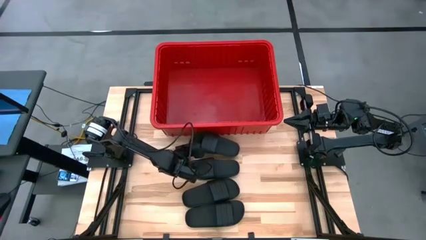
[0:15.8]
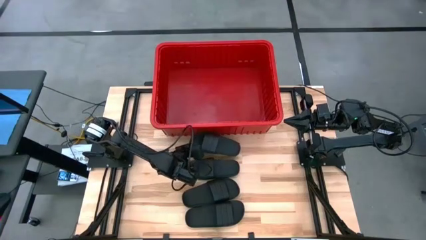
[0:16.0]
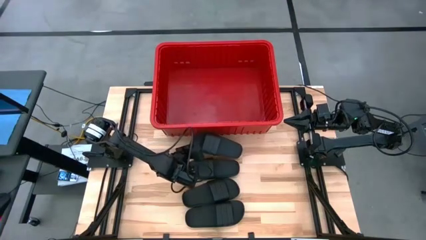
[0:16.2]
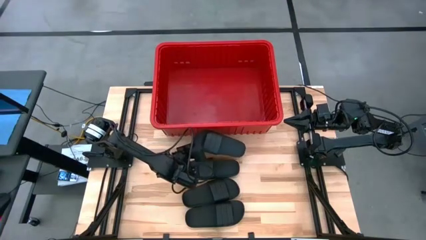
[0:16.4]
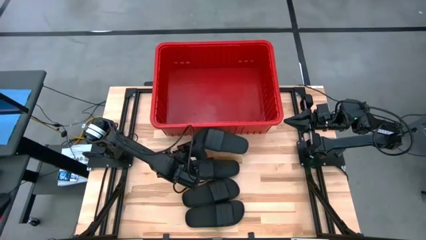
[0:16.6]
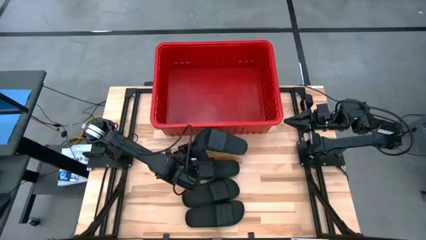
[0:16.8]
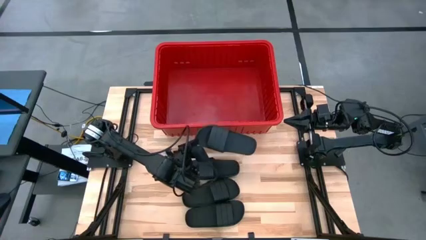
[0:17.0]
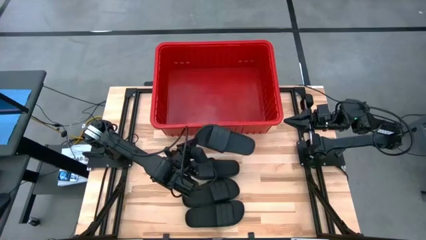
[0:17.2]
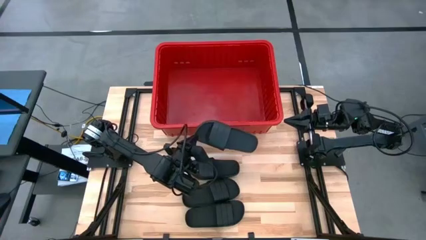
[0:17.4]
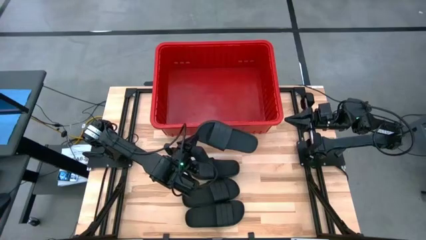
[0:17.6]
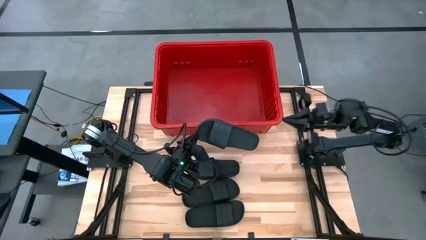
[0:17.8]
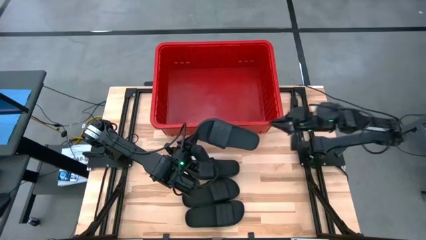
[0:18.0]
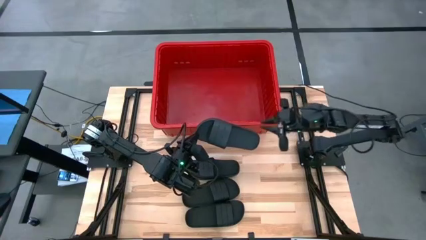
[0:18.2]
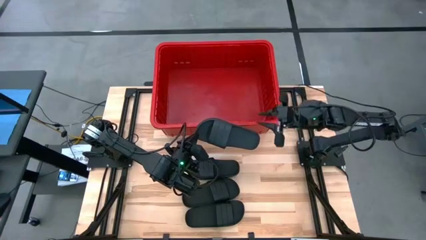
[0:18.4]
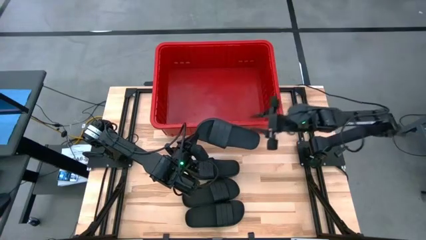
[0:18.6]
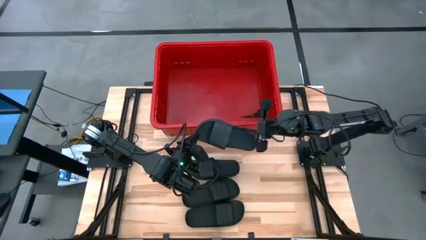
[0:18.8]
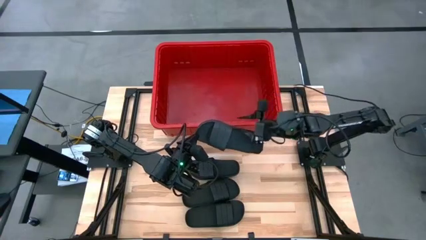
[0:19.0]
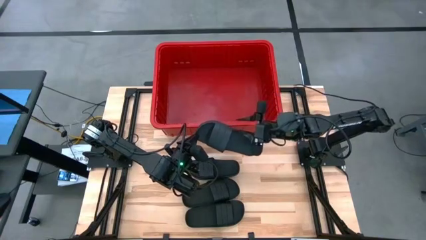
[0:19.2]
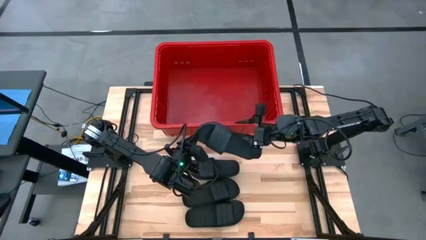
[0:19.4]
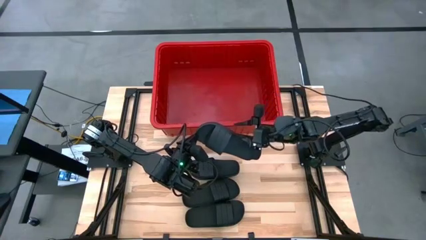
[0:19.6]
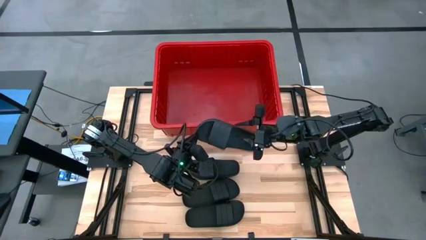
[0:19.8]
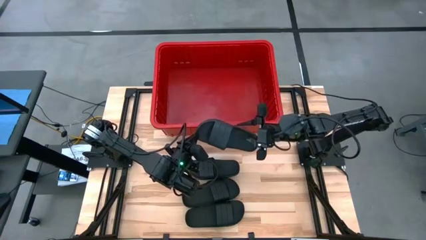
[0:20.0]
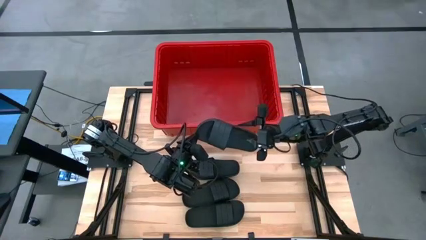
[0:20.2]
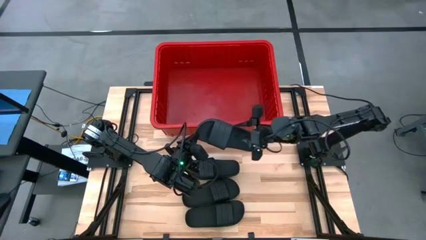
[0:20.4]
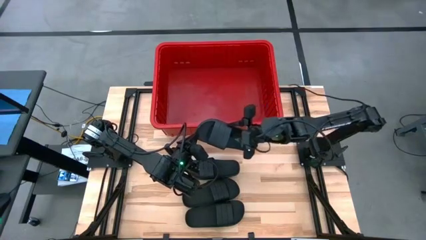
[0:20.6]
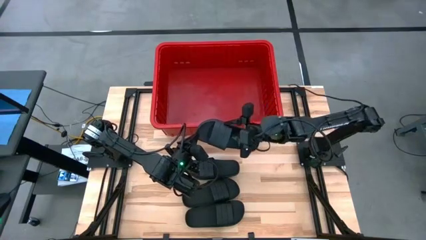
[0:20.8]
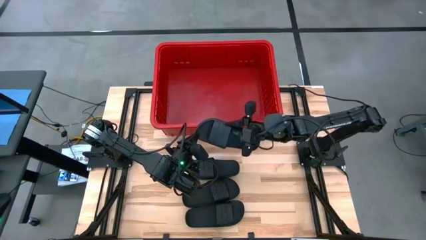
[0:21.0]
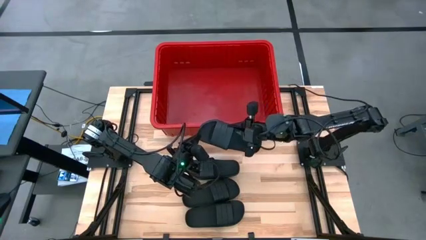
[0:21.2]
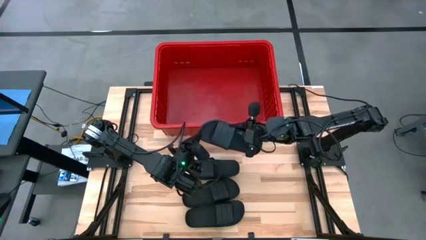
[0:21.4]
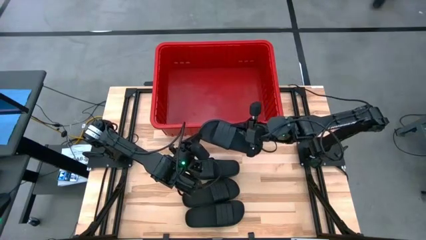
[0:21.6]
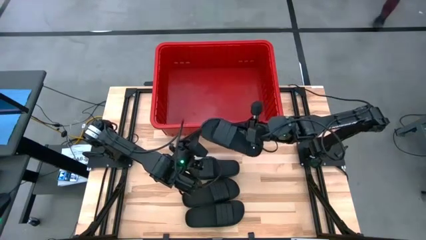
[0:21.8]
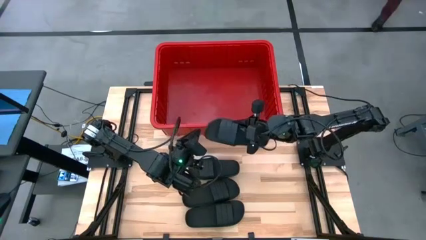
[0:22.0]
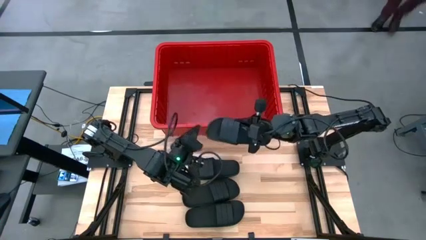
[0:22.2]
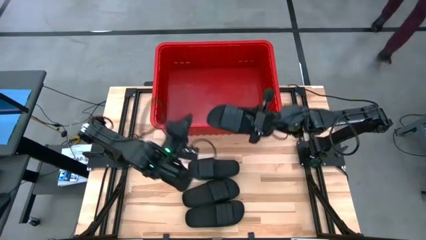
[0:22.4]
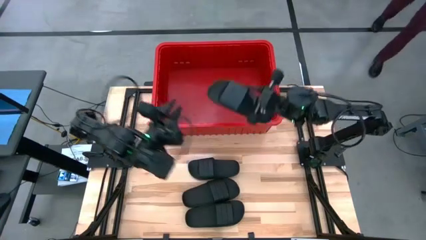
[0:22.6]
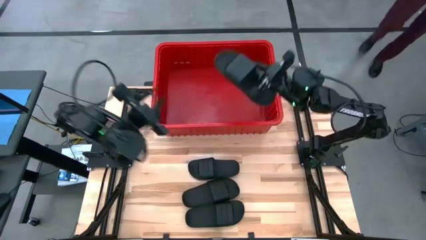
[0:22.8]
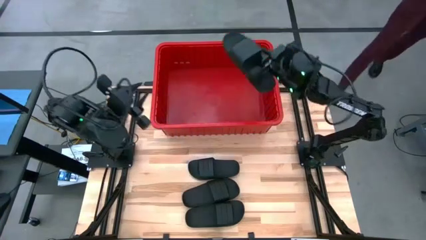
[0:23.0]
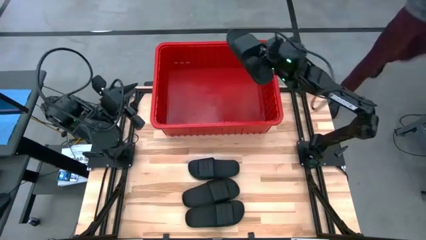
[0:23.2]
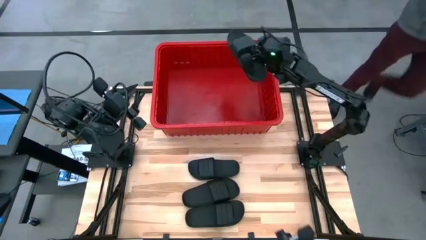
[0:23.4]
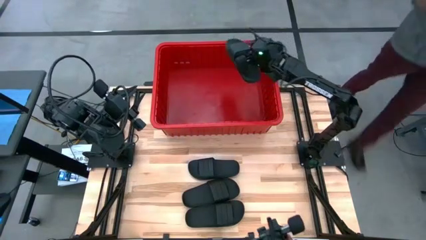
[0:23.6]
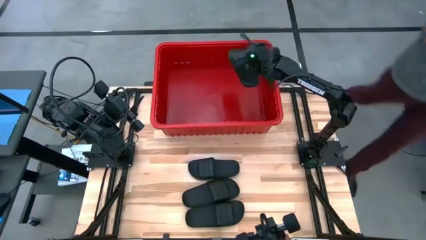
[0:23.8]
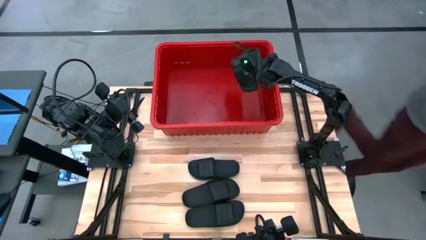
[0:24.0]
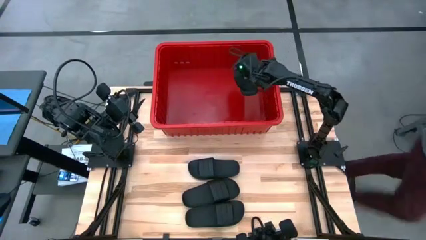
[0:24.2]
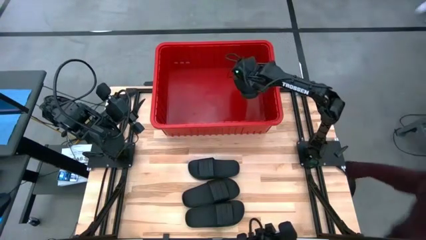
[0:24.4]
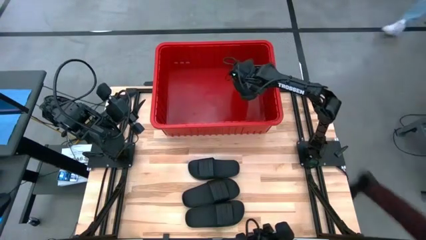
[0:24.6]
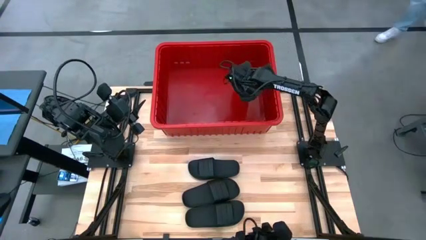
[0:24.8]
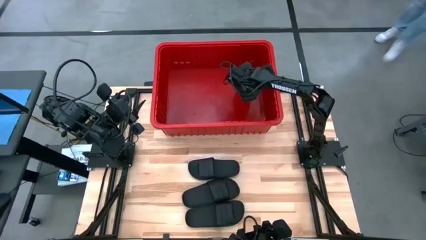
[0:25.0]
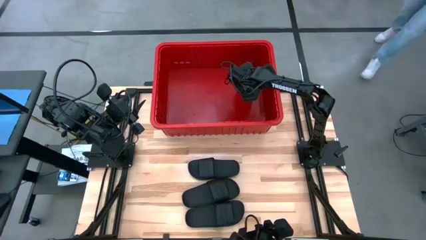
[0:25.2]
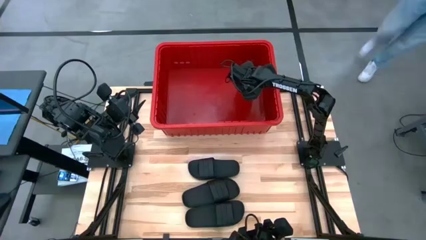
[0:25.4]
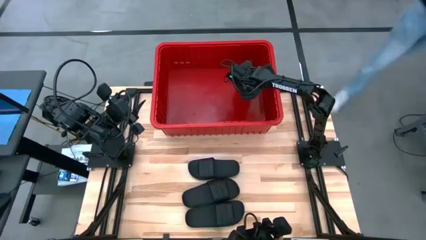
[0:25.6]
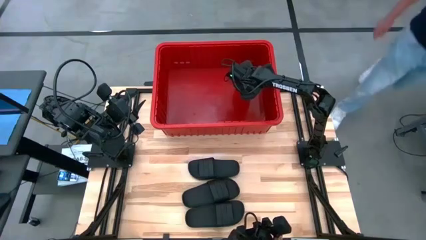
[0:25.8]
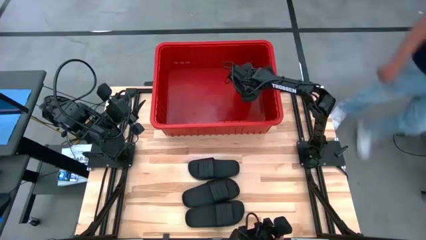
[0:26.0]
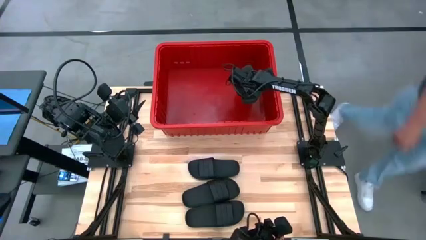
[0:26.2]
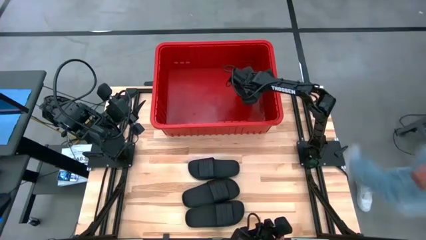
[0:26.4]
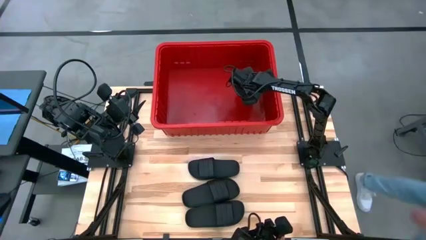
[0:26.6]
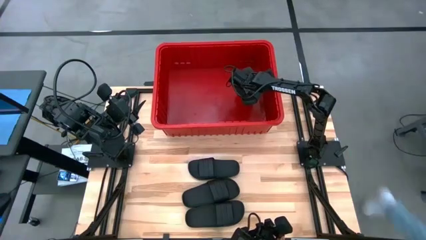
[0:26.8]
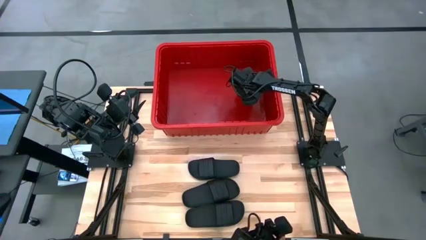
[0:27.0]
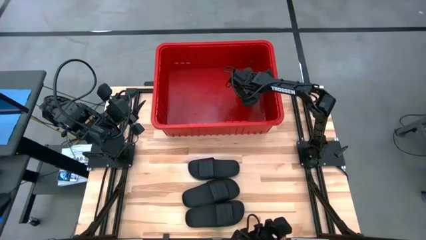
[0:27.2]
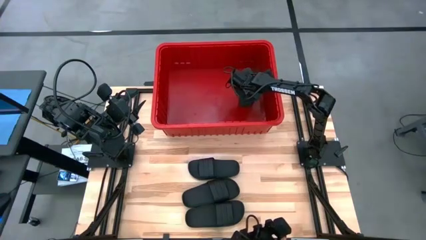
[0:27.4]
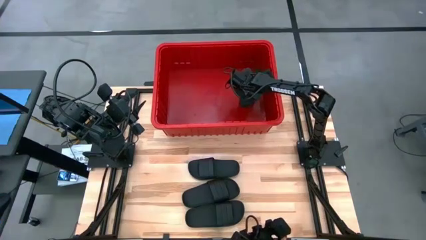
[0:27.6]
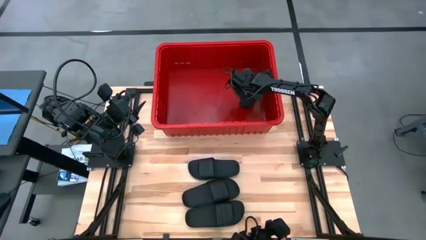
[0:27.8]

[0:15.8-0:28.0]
Task: Pick and place slides into bin
Put the black slide into the container

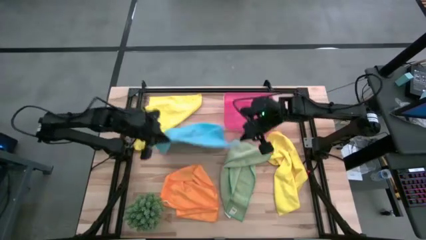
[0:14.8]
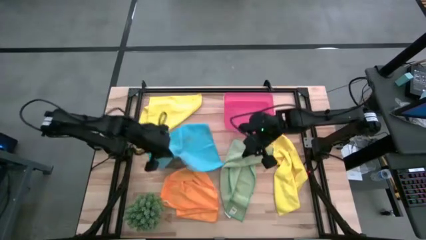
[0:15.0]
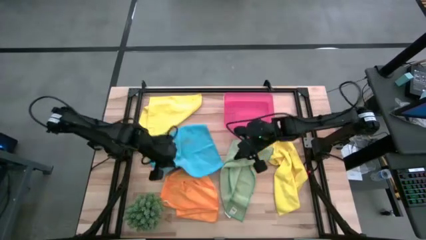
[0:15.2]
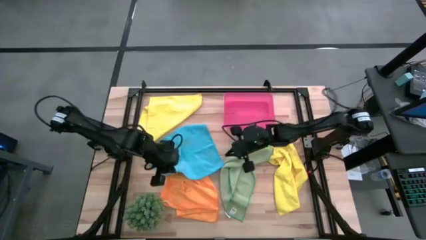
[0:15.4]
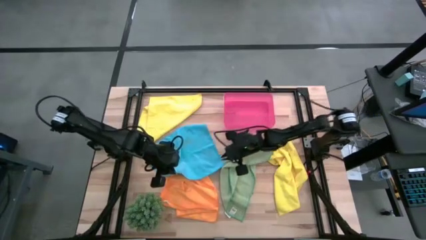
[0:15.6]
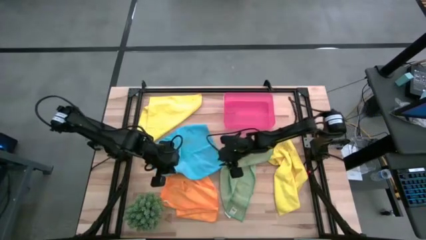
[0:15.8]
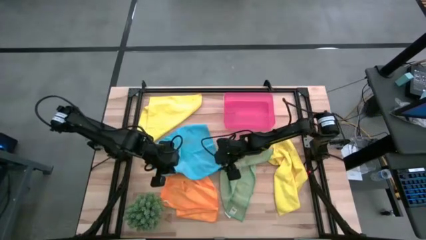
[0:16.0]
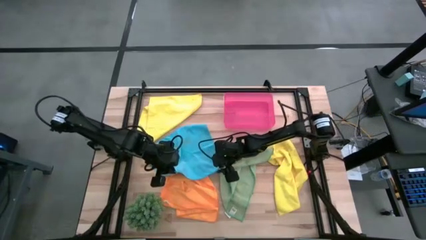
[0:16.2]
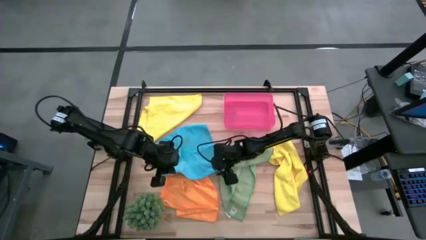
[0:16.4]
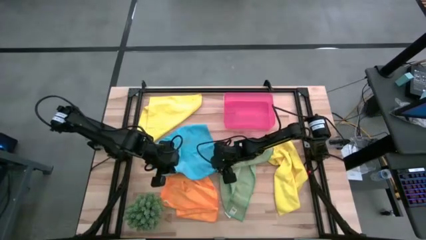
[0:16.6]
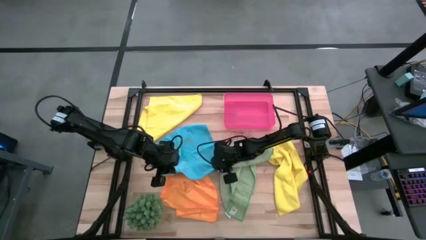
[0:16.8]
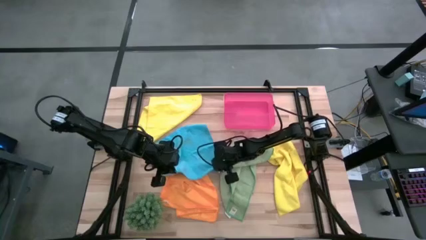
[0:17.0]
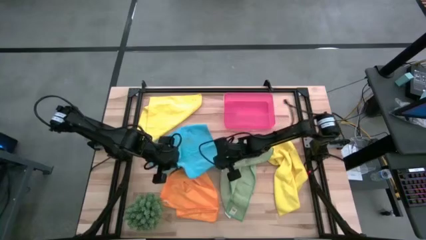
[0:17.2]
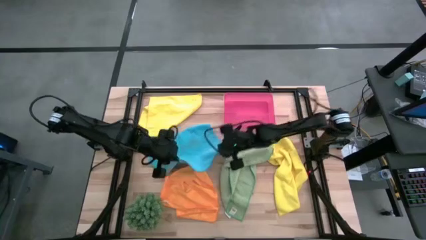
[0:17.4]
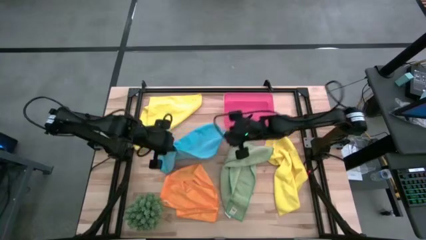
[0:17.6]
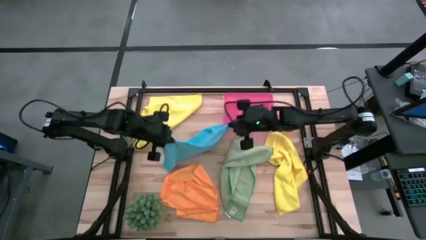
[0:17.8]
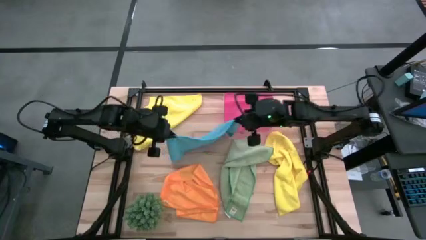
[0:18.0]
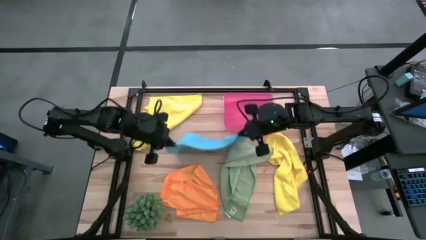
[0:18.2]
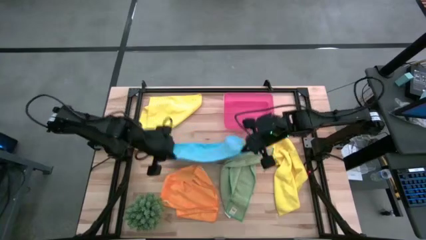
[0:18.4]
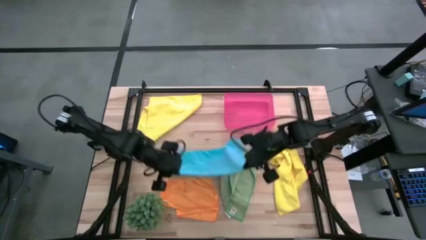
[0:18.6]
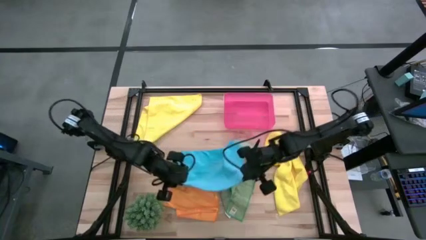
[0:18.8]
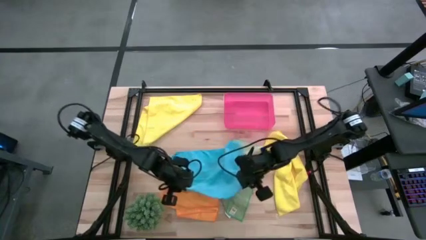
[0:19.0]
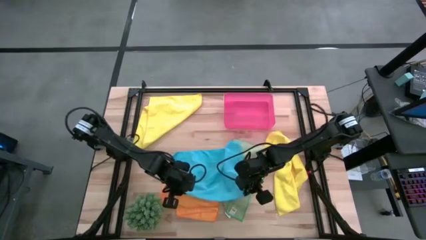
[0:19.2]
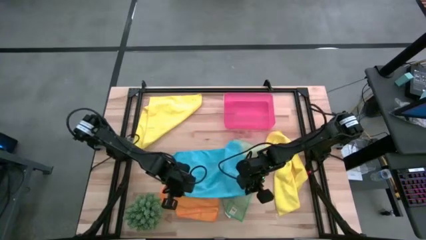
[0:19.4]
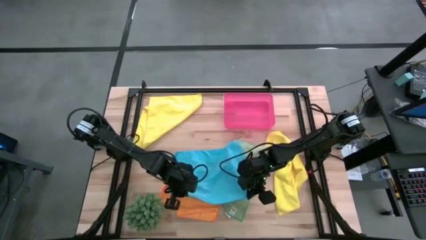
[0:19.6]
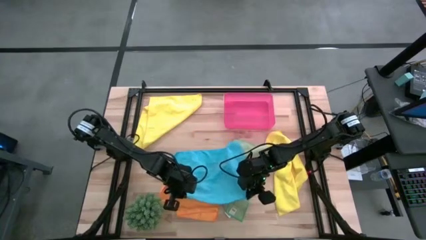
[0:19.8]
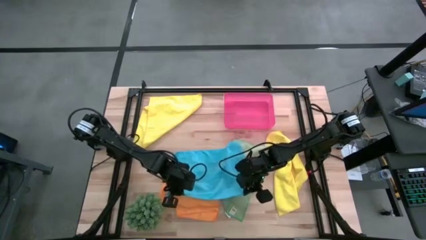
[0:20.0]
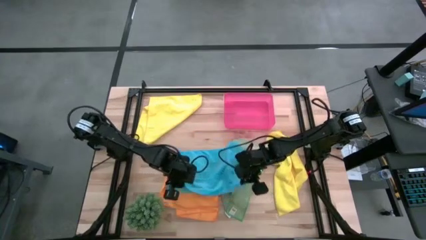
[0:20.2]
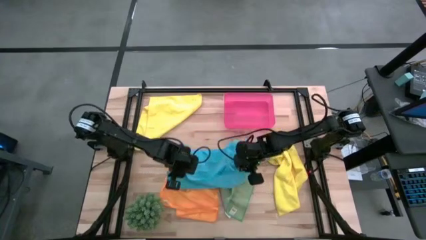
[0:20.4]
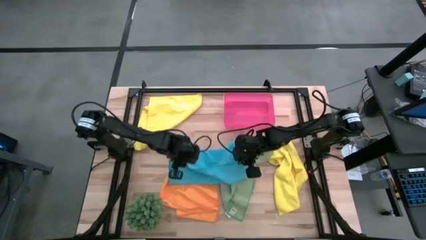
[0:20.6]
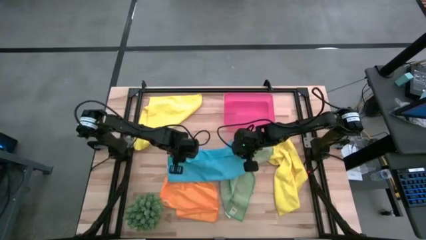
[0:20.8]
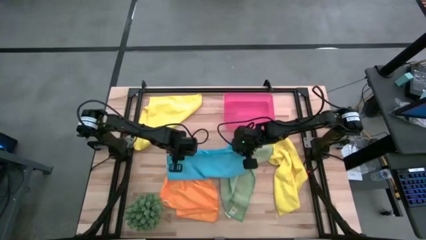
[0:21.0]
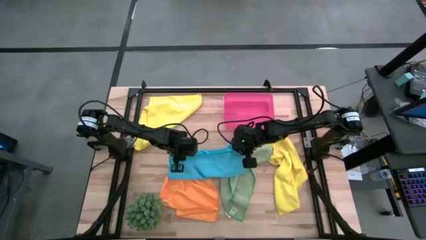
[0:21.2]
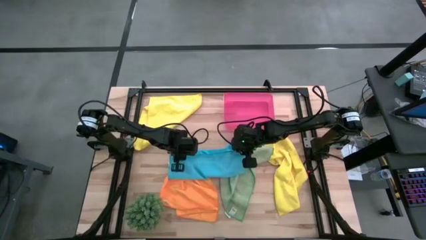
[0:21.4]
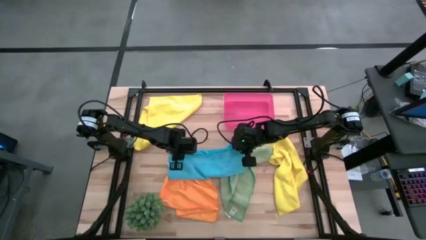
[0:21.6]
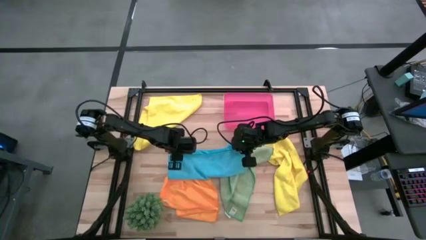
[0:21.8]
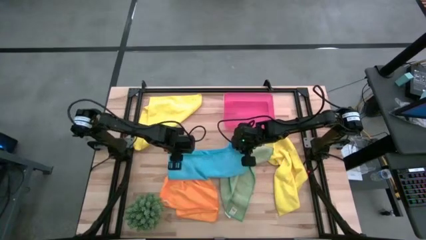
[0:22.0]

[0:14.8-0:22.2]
Task: Fold microfiber towels
Fold the blue microfiber cloth
